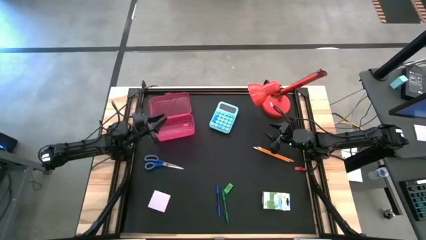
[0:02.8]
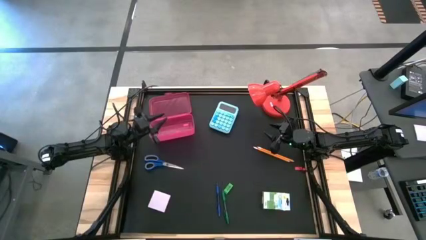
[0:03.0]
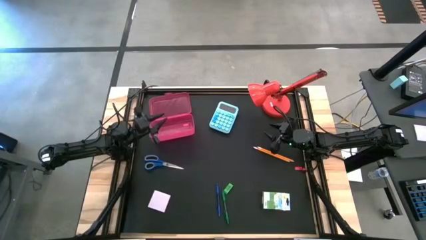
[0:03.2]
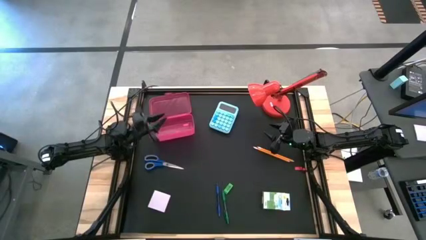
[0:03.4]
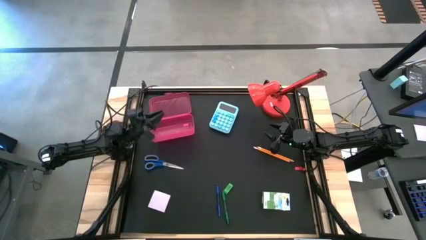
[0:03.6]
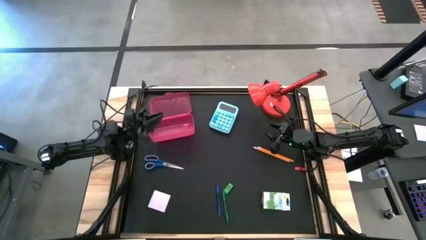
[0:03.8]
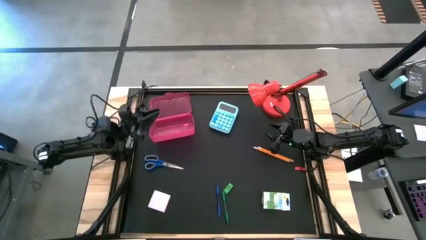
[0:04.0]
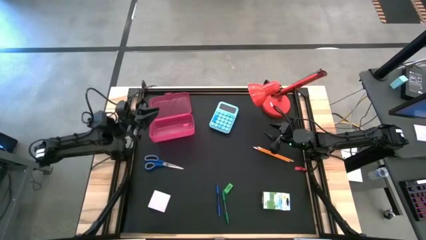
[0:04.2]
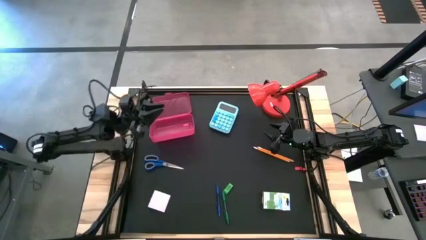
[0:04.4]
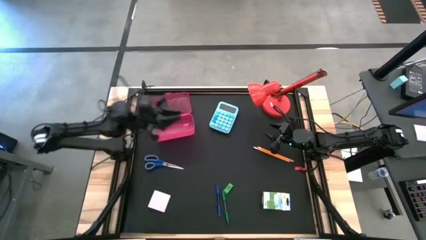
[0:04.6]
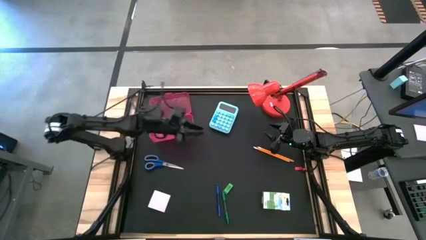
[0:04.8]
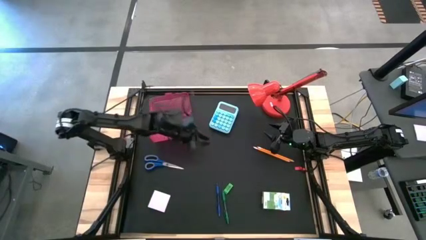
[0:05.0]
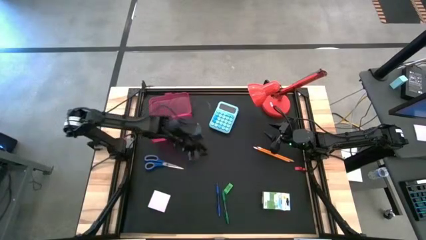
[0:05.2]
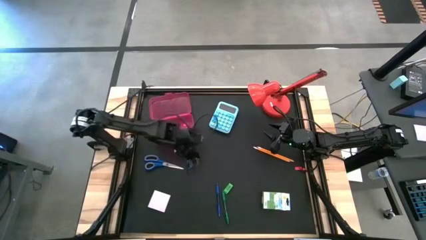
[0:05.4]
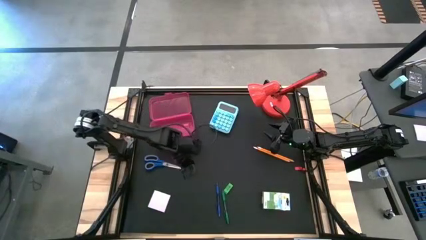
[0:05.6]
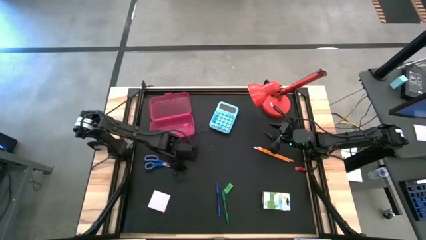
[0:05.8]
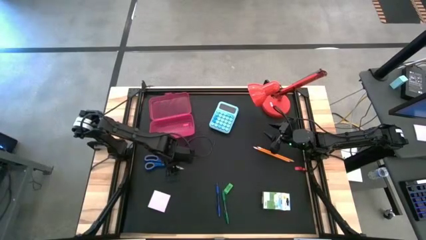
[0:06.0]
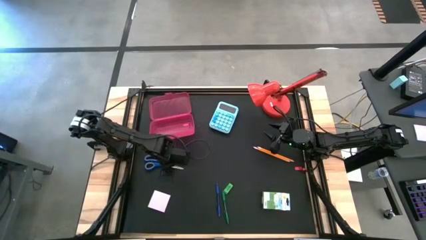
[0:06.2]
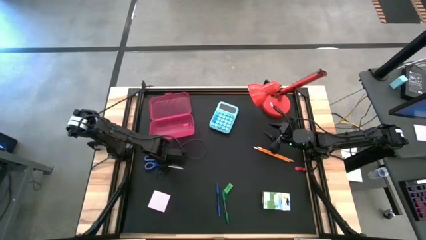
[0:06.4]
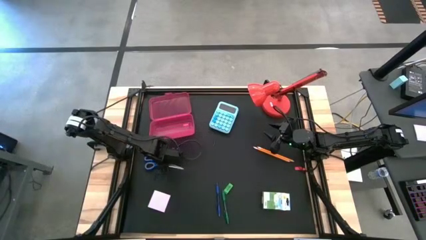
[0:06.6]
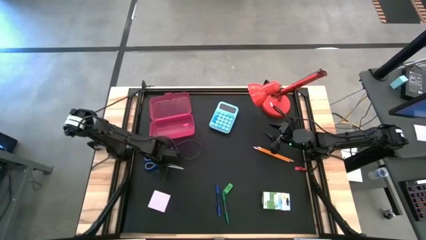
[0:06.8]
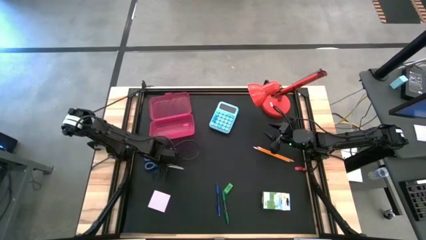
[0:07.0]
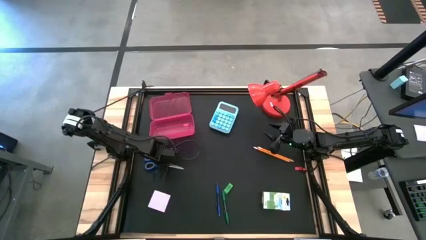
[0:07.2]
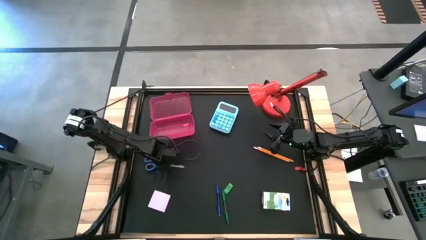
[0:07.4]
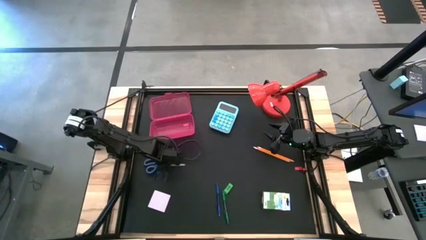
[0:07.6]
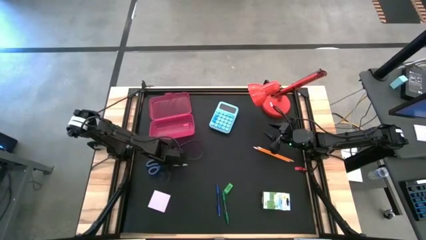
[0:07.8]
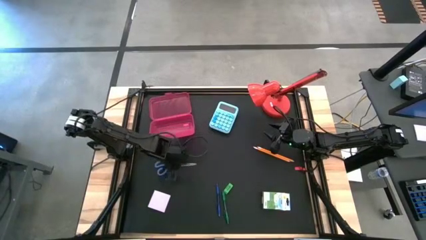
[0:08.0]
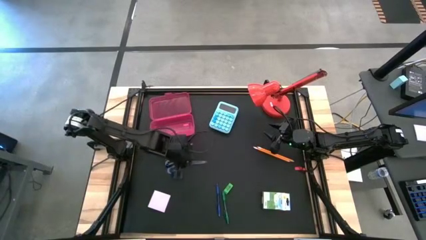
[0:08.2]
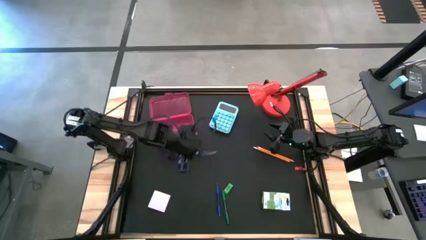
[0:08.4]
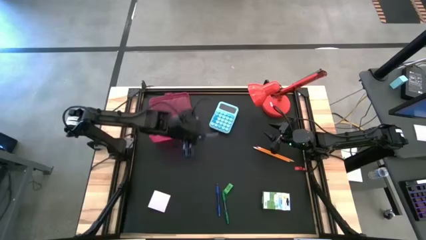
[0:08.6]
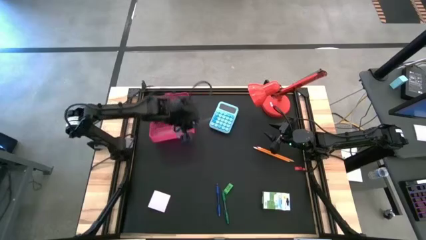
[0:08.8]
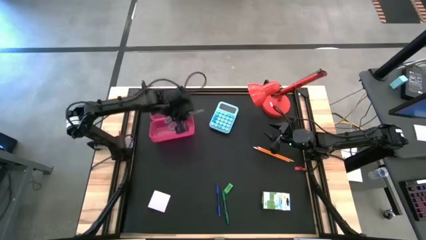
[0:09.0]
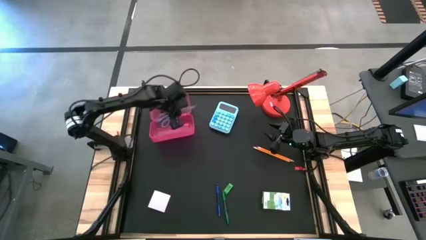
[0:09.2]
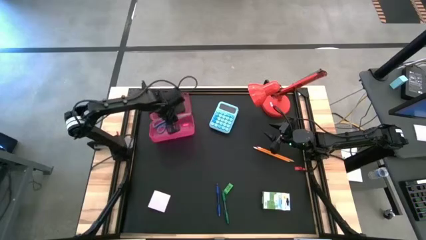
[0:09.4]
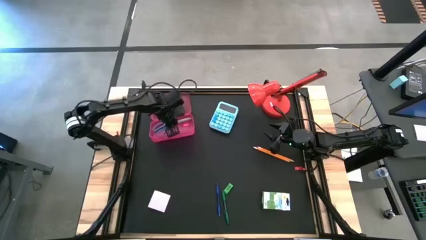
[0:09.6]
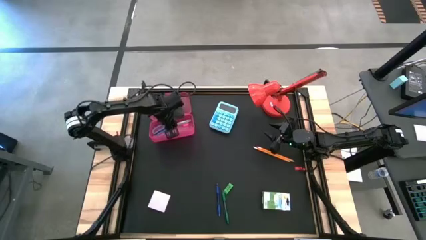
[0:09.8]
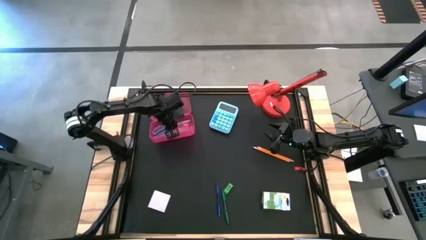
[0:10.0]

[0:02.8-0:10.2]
Task: Pack school essentials
Put the blue scissors into the pink supply box

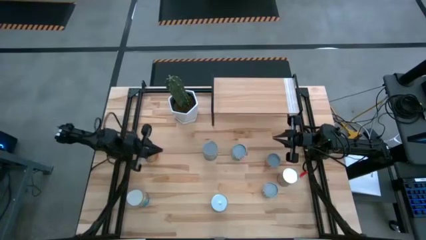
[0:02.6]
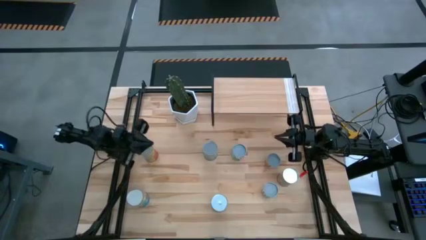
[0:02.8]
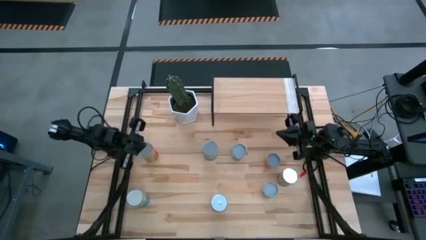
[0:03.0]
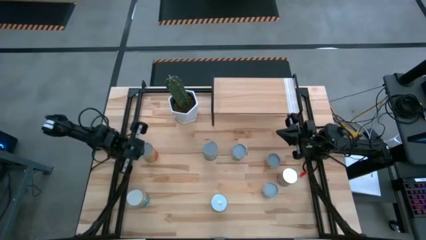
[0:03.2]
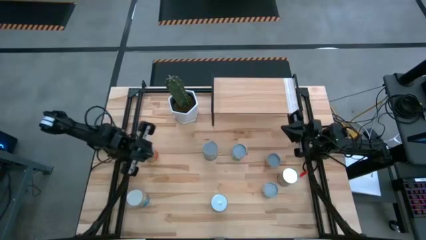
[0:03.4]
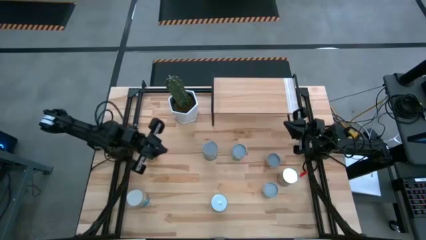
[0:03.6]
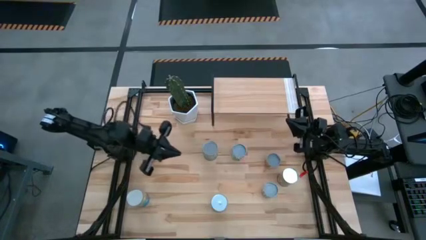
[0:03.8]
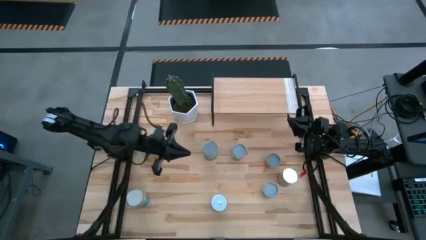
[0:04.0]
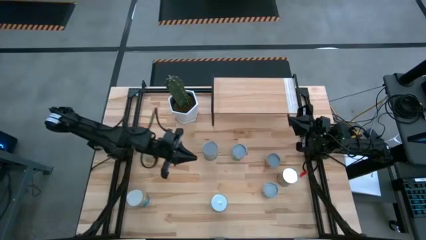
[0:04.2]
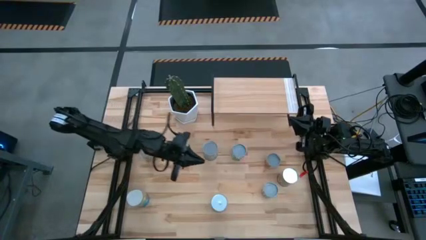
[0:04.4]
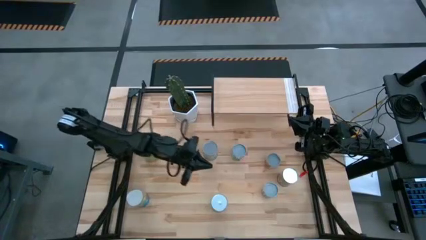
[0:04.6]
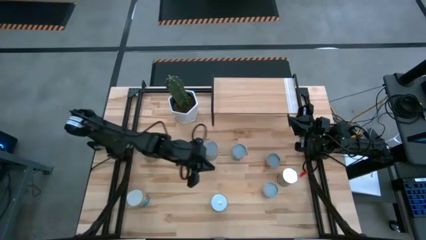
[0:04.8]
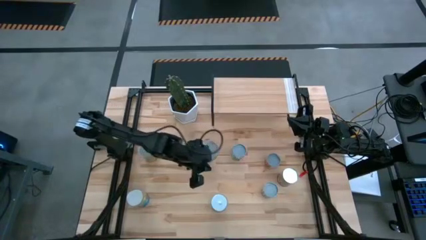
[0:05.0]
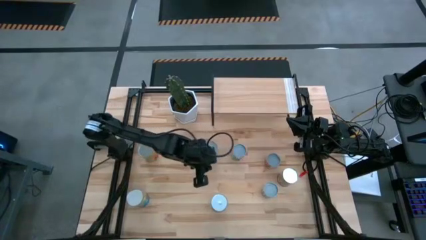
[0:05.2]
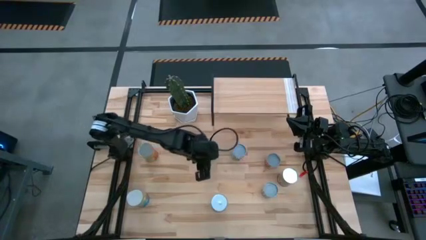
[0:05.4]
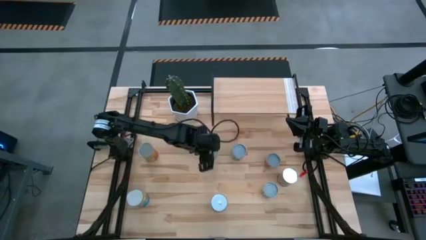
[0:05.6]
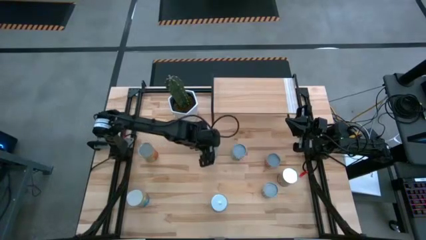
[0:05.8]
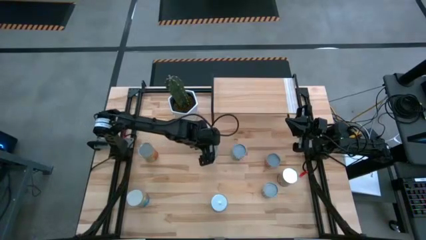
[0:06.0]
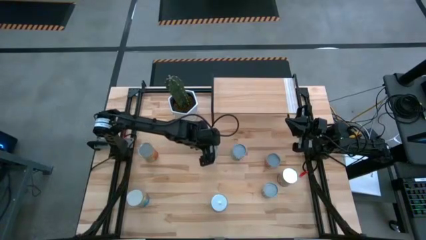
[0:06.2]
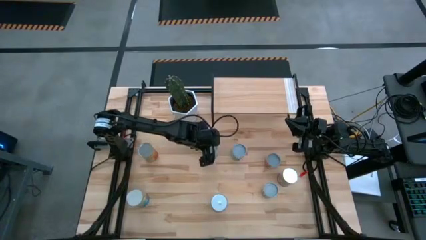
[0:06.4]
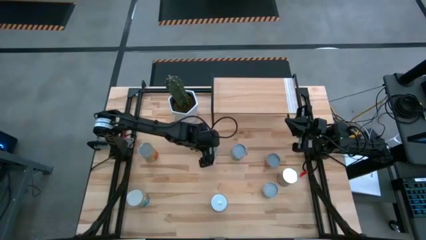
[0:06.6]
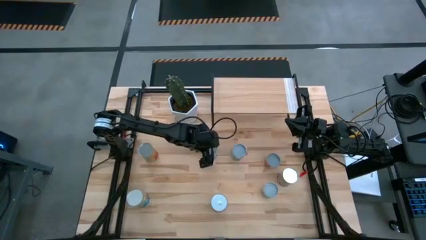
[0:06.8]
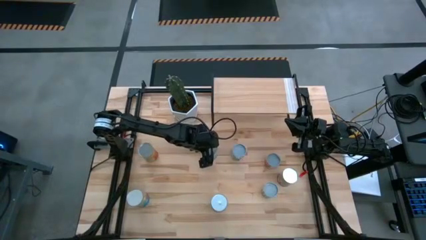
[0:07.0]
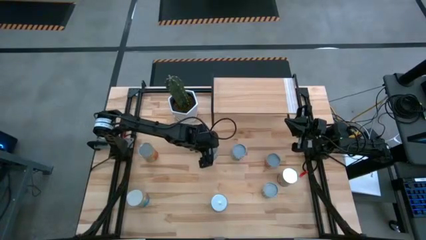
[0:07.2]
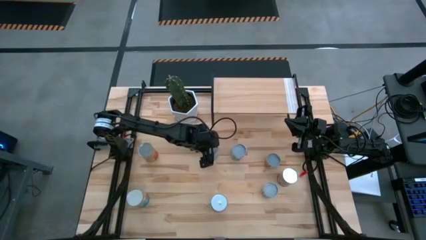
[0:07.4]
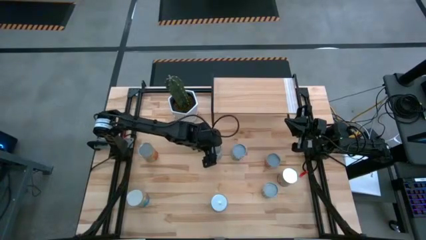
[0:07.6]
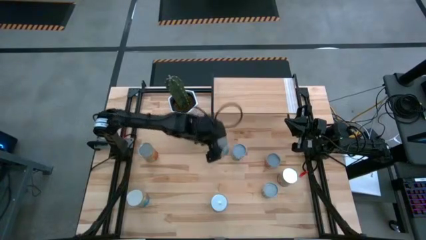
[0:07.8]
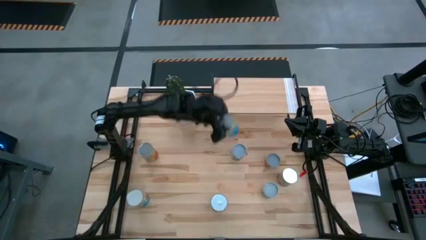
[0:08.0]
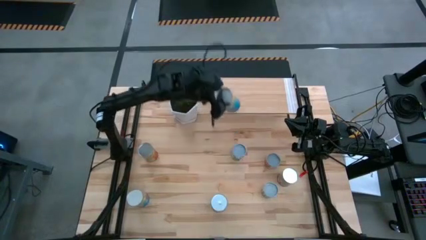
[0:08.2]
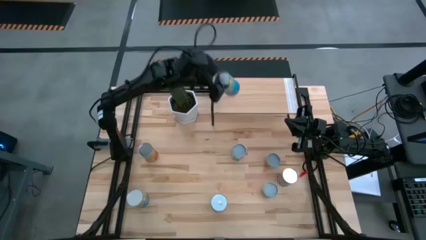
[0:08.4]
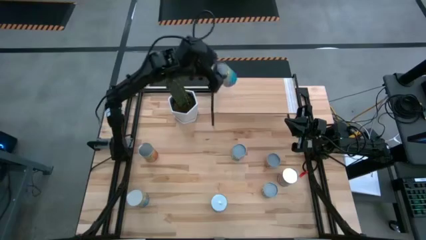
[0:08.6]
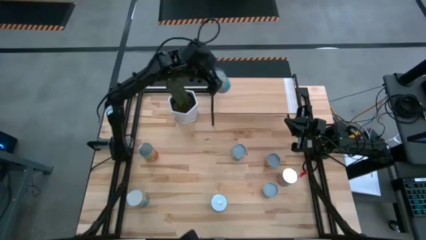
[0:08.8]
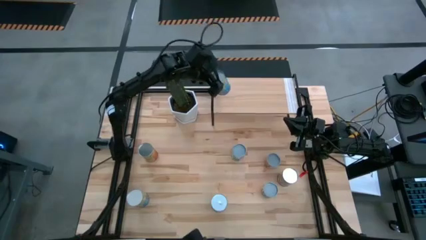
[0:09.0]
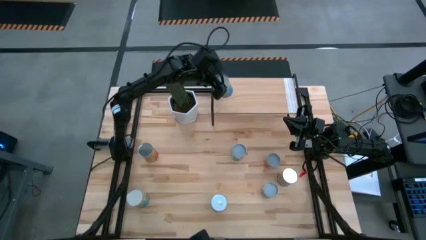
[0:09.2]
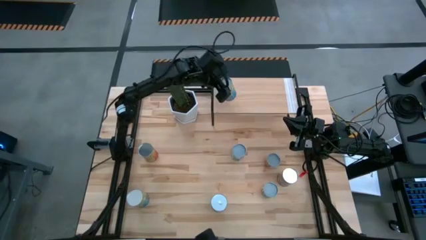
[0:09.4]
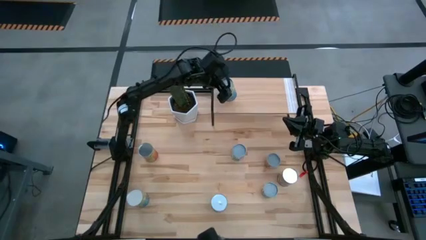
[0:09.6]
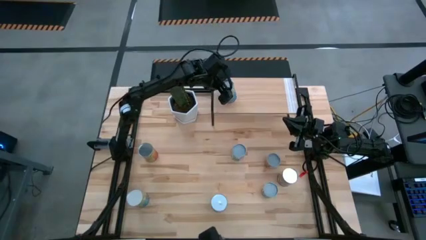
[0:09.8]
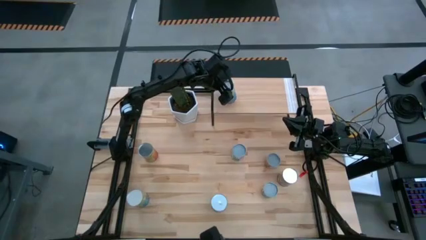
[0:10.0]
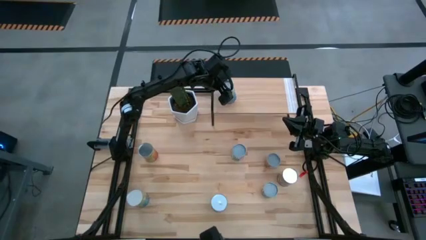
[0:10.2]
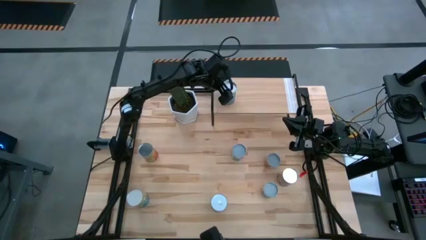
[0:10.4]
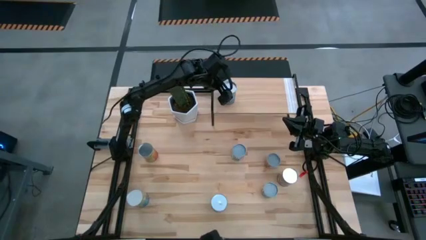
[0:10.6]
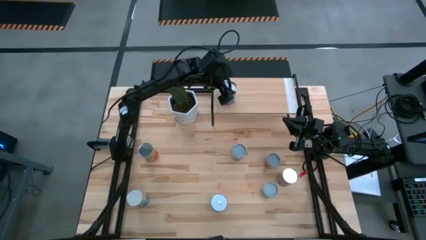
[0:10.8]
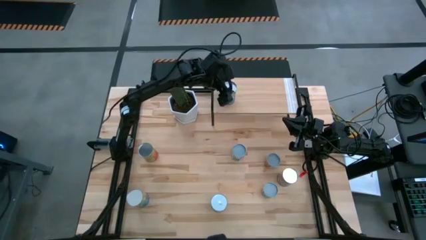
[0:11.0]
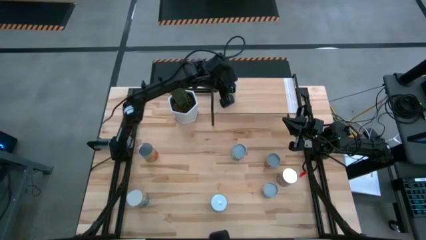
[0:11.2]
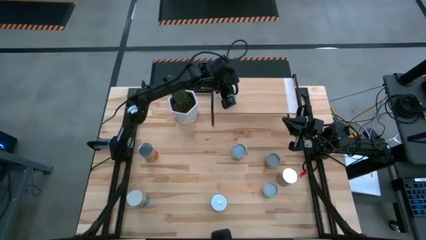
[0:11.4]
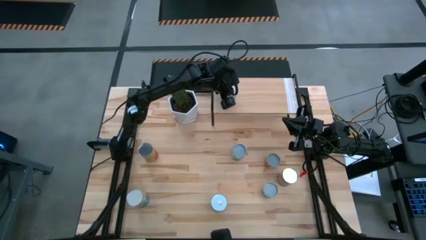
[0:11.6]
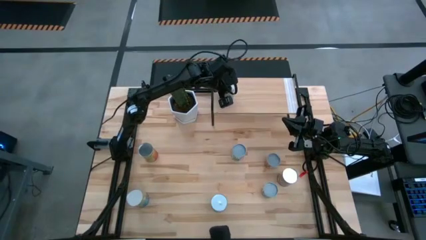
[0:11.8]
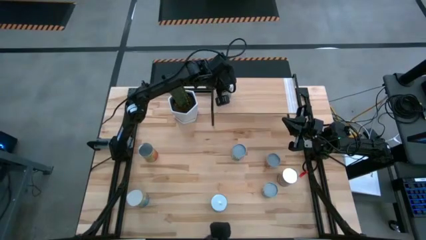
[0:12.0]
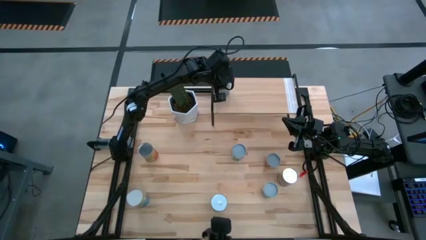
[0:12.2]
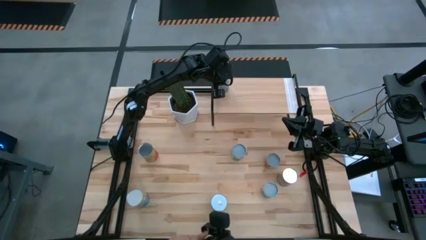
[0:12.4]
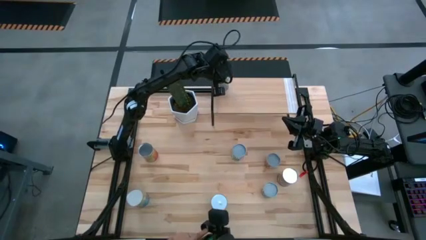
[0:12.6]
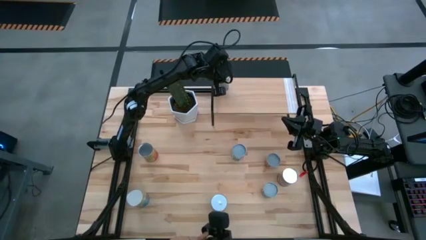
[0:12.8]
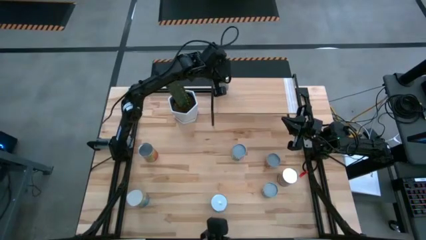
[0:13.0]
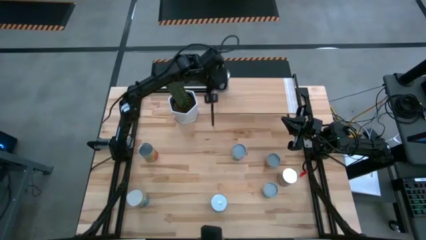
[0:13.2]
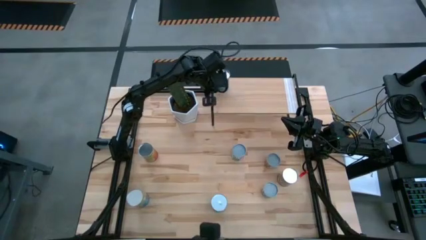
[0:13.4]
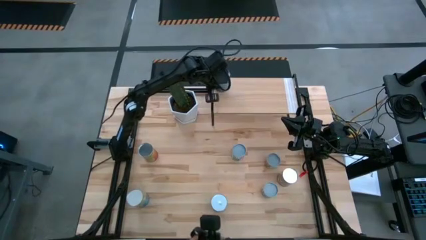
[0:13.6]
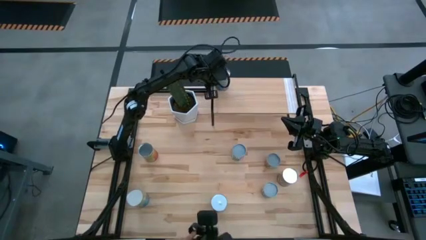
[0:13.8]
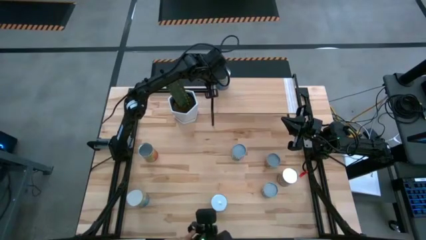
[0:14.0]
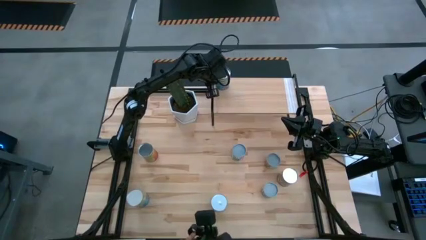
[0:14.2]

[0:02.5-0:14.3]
Task: Pick and place cans onto a shelf
Put the canned cherries on the shelf
